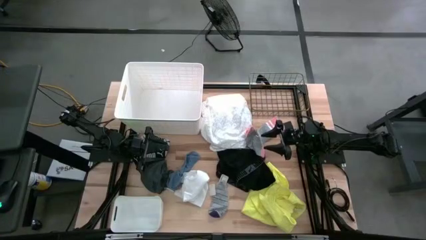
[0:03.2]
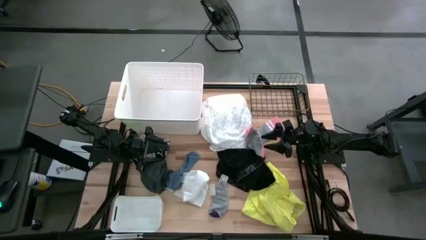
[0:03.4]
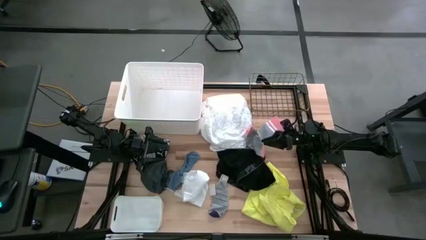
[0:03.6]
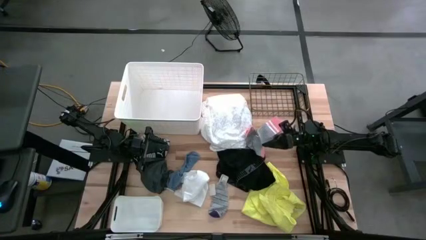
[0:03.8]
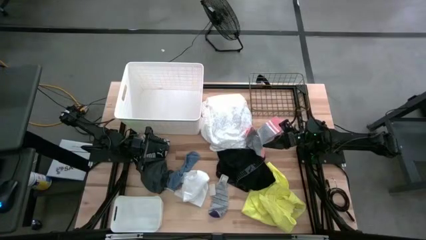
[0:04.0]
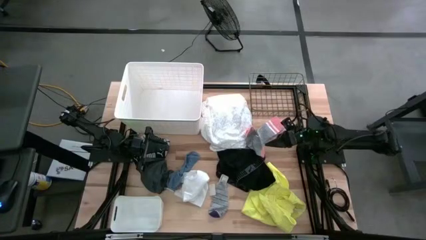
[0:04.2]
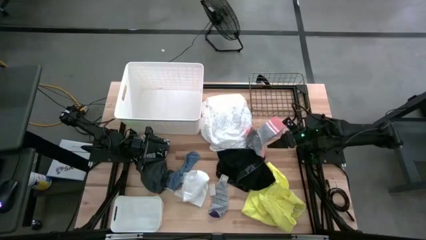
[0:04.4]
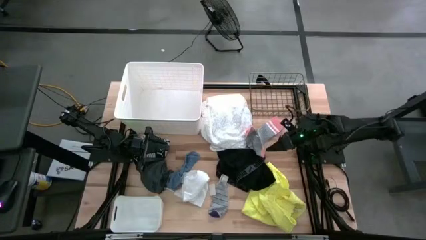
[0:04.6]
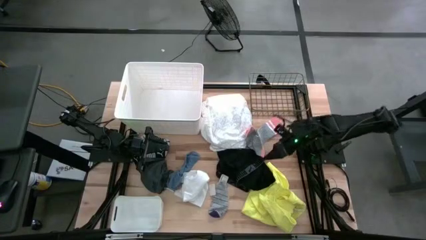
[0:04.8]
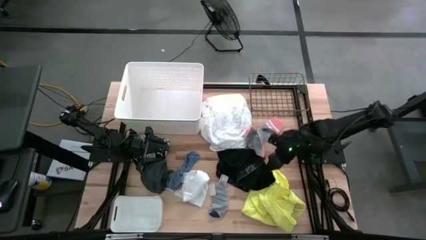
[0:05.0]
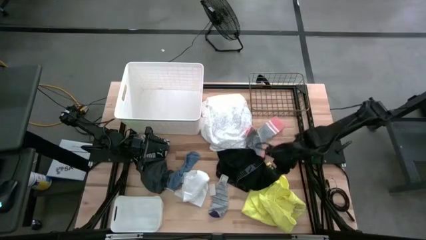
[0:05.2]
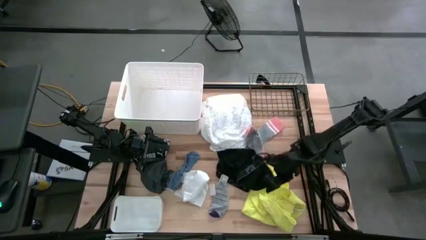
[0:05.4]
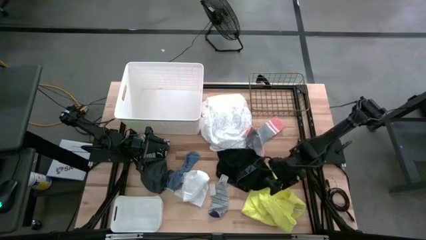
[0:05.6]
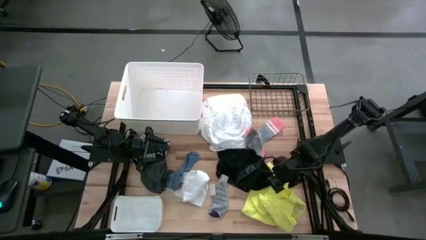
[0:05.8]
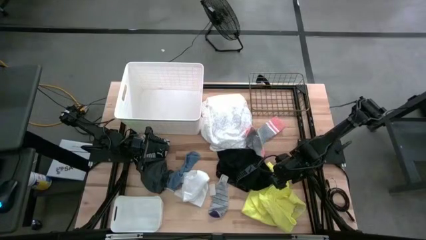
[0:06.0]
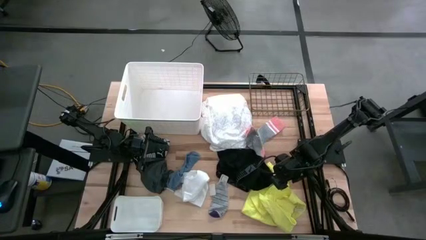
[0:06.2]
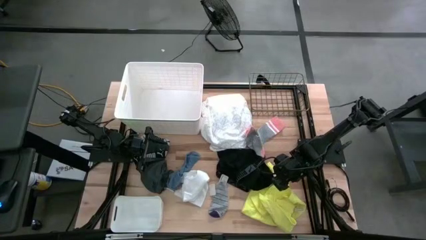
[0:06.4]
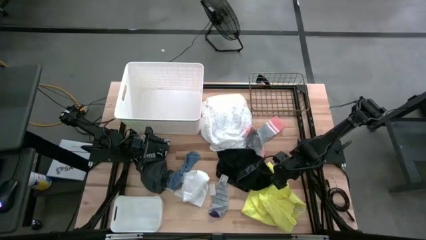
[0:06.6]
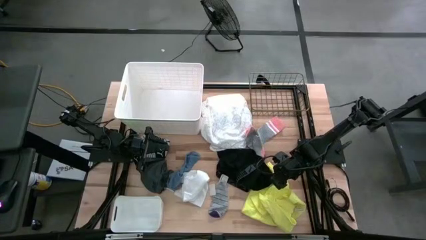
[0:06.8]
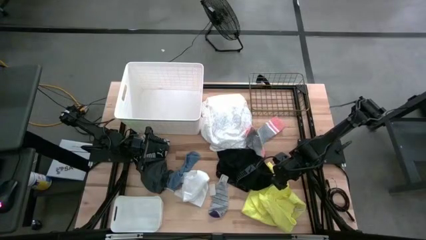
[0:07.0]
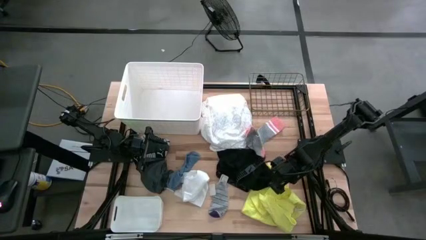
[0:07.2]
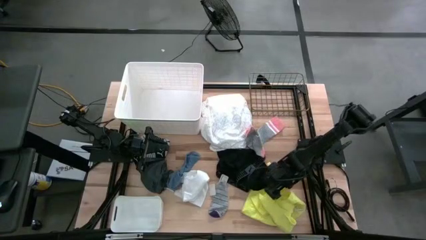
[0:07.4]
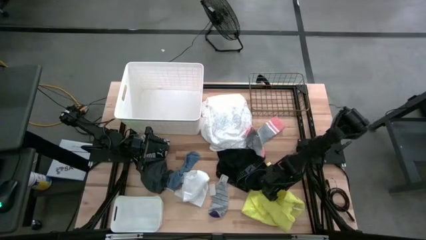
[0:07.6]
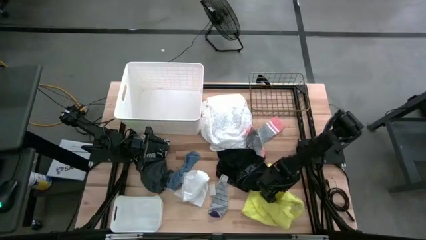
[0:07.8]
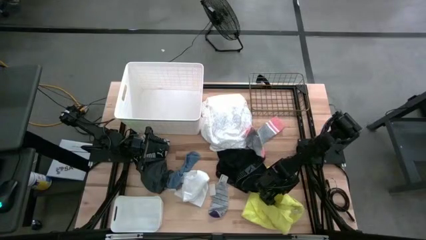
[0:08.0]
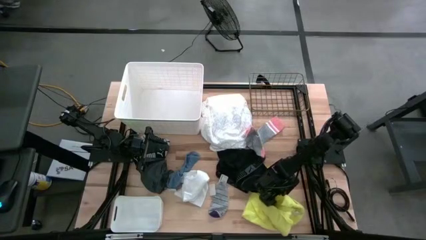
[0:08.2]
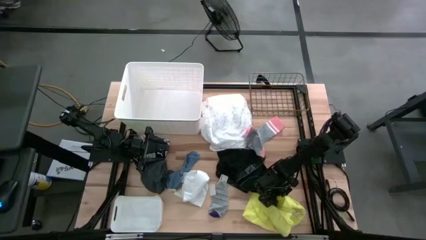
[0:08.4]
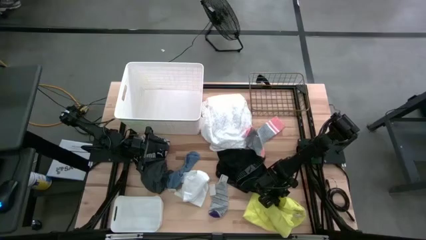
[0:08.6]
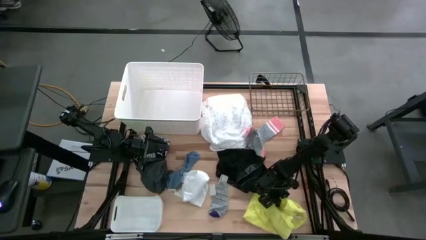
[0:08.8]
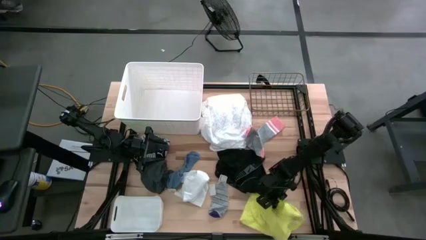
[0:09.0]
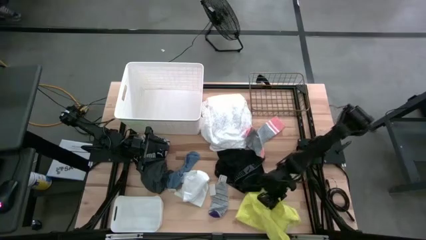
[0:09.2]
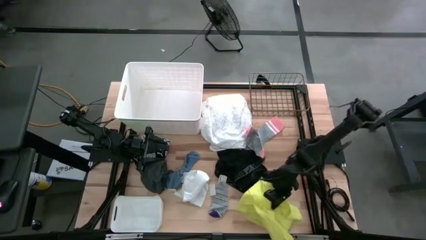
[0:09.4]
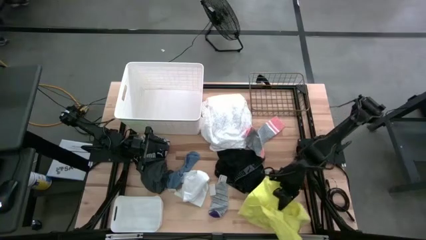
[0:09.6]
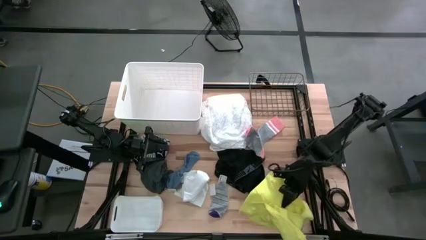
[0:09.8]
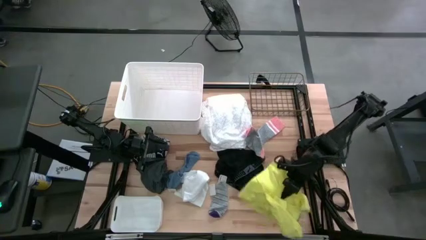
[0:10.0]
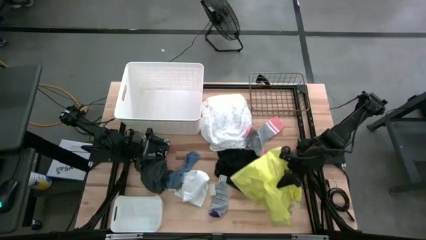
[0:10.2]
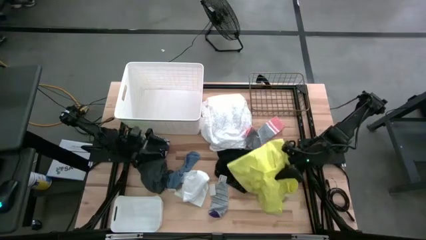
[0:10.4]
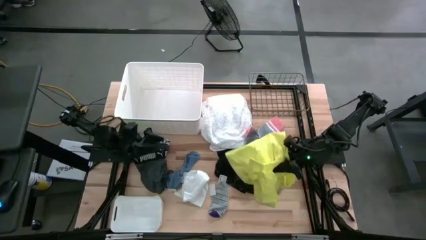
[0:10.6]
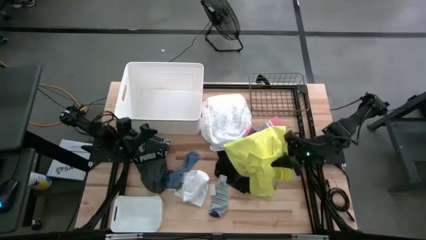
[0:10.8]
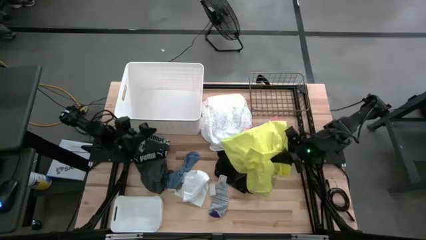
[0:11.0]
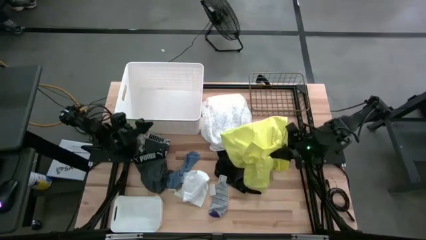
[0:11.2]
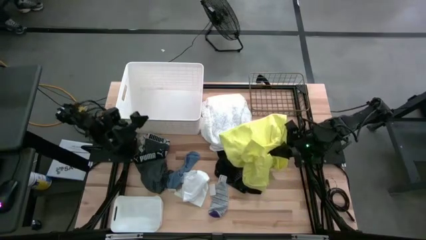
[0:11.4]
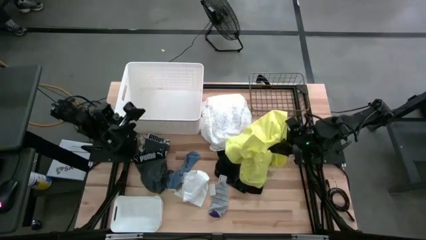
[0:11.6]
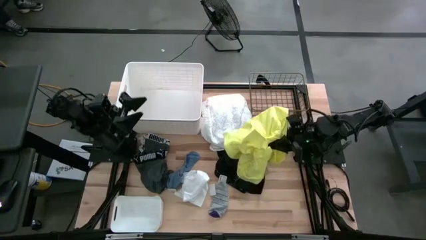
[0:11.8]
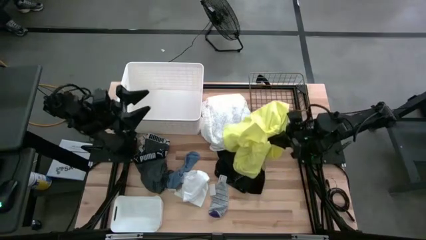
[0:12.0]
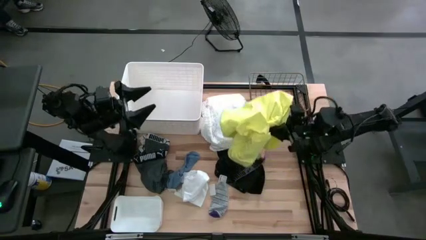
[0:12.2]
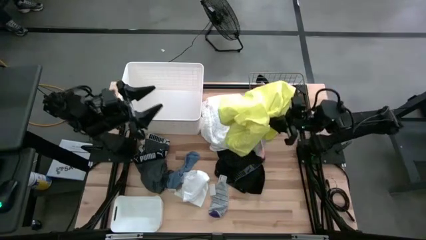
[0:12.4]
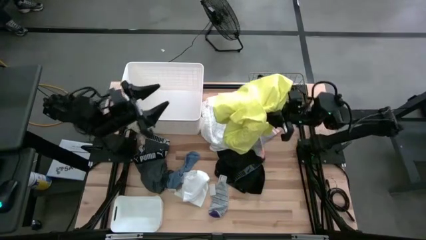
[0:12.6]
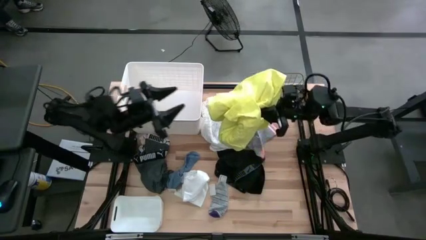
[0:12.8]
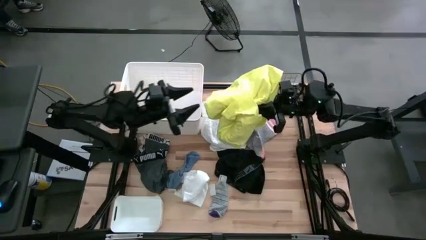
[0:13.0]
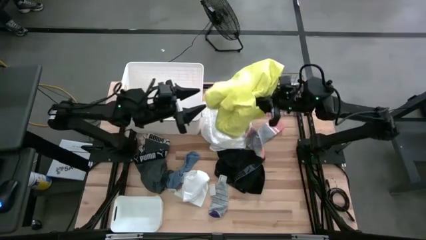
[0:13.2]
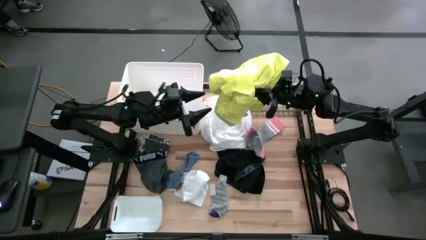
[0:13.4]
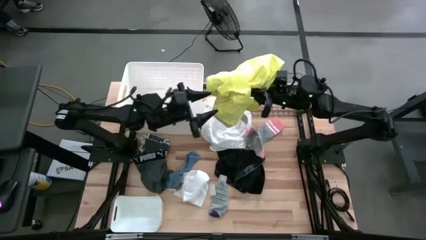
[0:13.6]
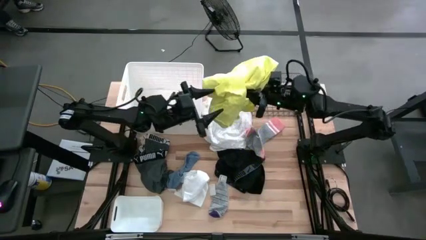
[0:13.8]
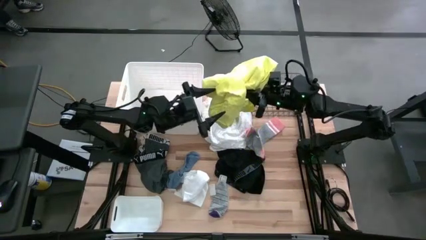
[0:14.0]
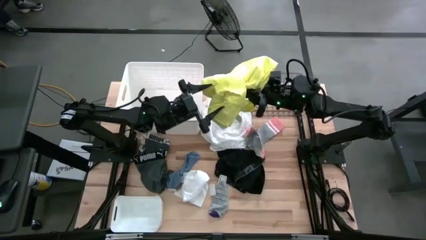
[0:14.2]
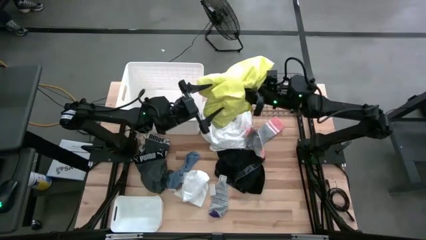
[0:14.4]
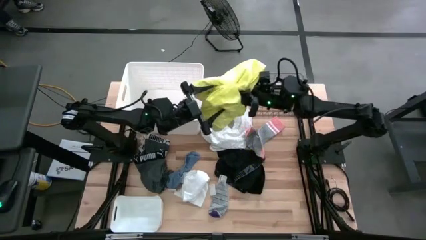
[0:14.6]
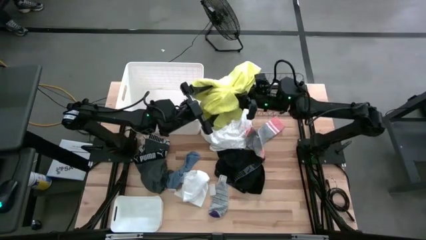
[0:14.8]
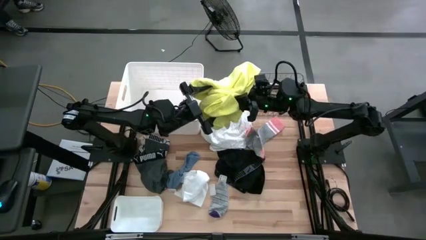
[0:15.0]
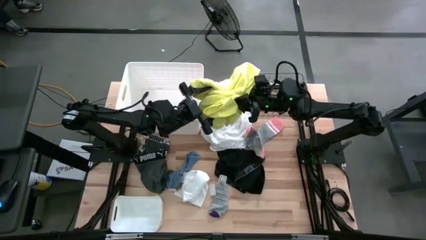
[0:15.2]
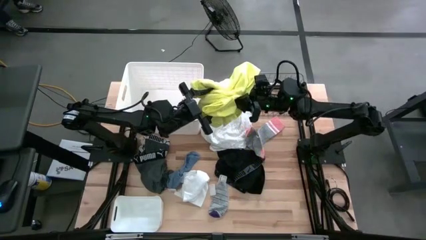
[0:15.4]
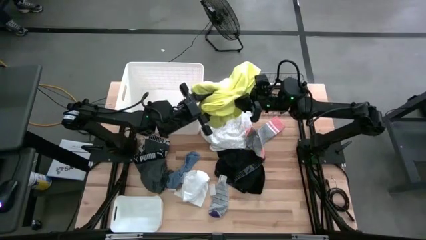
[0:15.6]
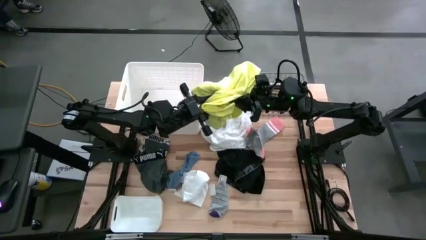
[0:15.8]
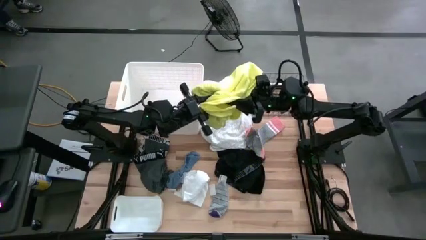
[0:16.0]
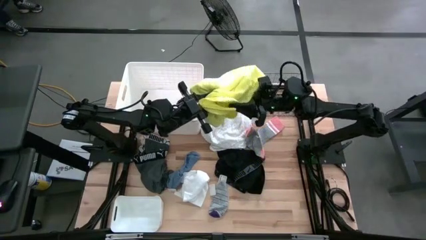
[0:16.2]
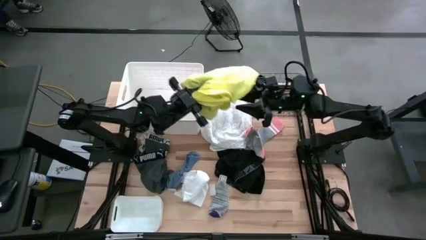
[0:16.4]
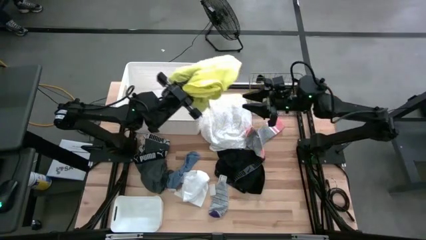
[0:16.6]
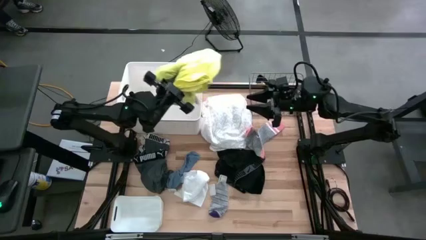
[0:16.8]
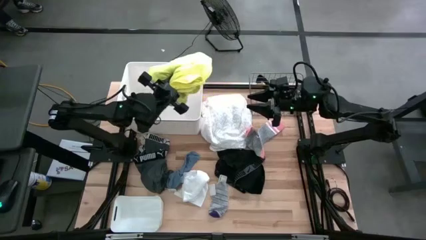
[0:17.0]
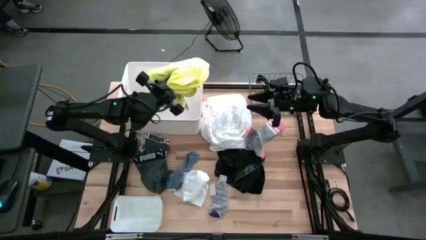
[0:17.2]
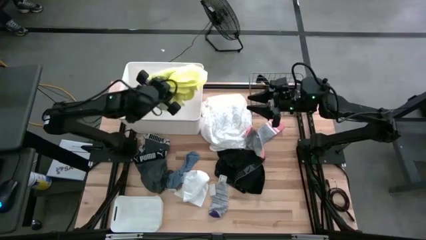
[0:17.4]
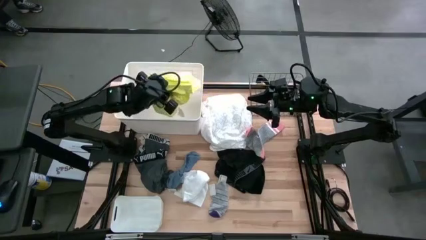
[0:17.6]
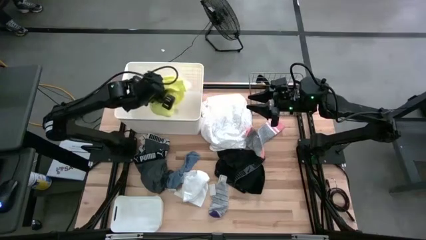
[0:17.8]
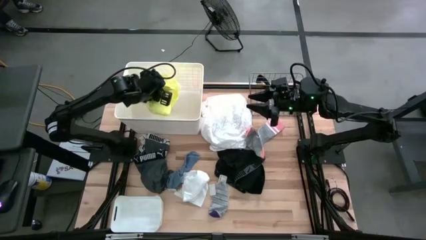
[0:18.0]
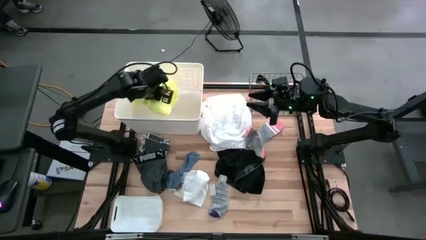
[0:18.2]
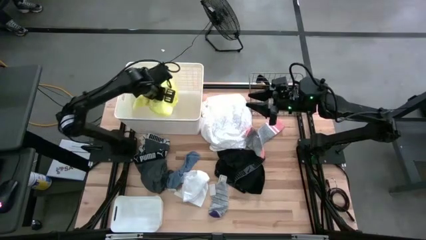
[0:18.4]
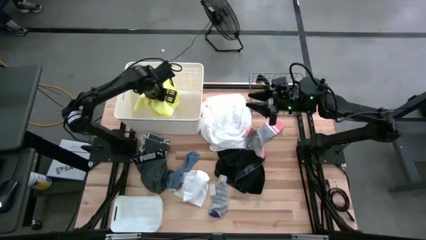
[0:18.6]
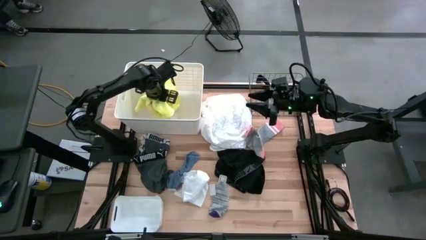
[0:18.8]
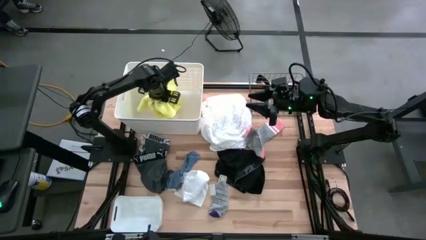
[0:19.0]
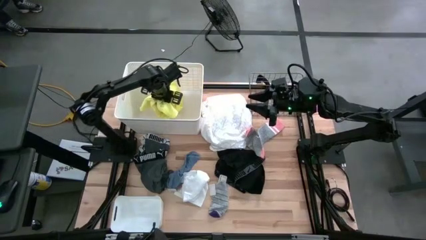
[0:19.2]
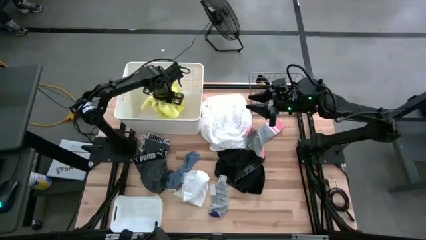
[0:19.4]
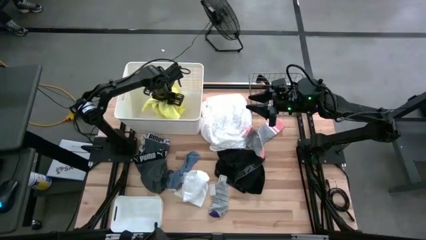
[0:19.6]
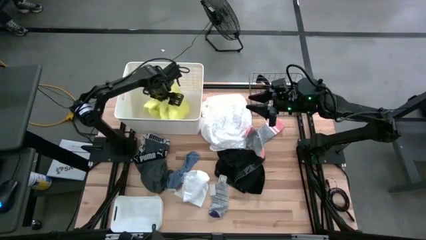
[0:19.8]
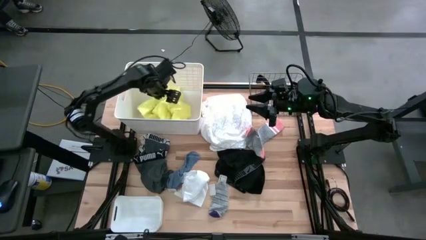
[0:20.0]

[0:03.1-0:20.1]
Task: Pick & Place Cloths
Put the yellow shirt into the top white bin
